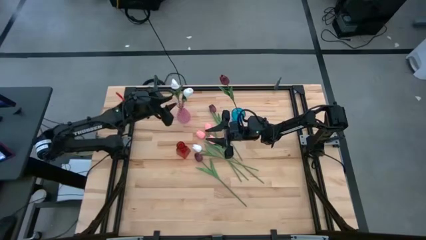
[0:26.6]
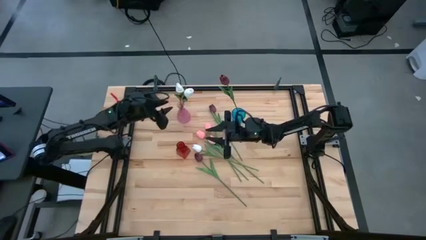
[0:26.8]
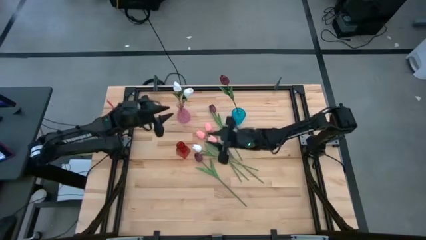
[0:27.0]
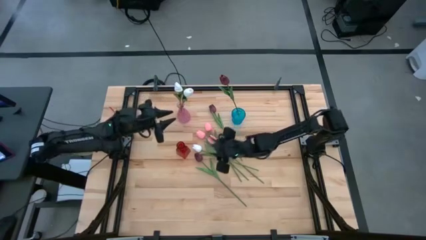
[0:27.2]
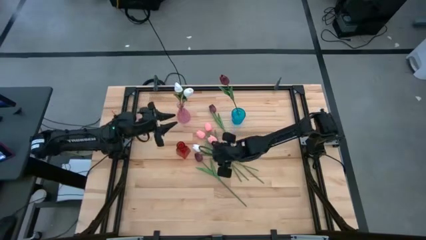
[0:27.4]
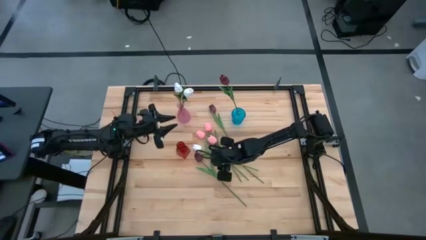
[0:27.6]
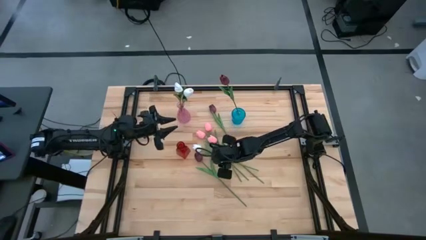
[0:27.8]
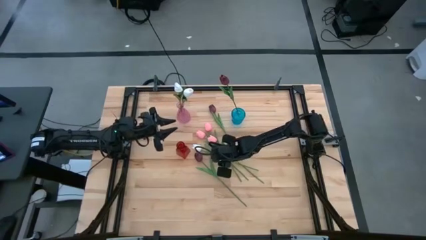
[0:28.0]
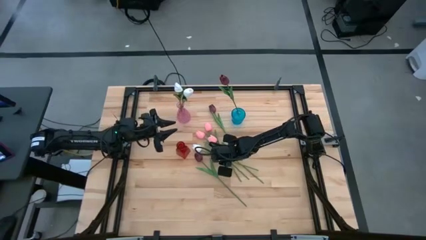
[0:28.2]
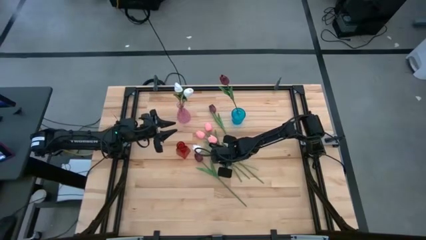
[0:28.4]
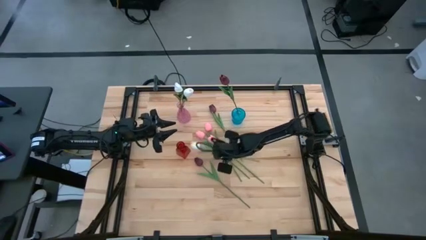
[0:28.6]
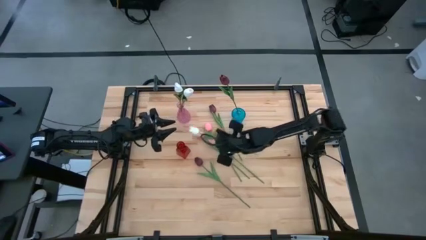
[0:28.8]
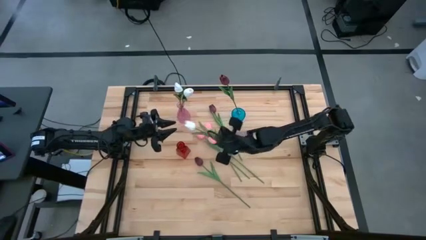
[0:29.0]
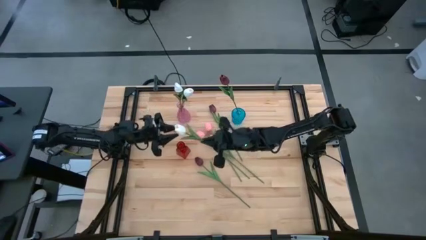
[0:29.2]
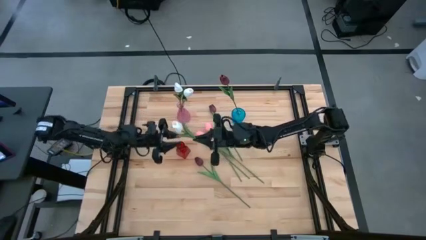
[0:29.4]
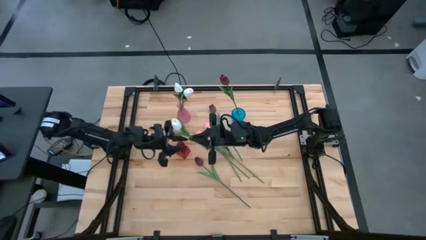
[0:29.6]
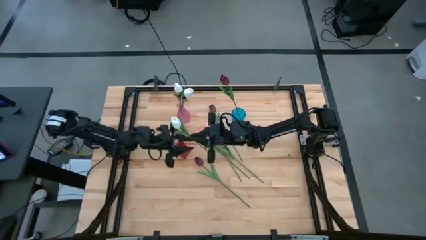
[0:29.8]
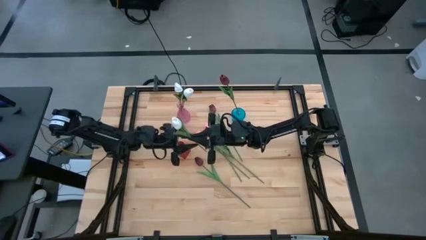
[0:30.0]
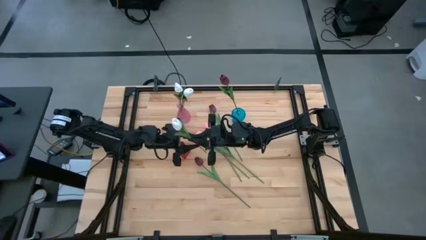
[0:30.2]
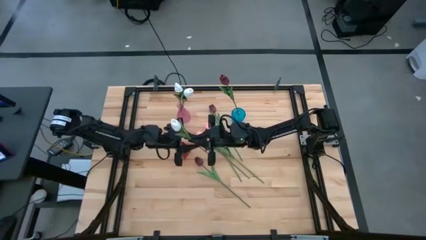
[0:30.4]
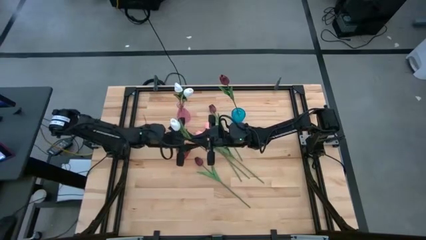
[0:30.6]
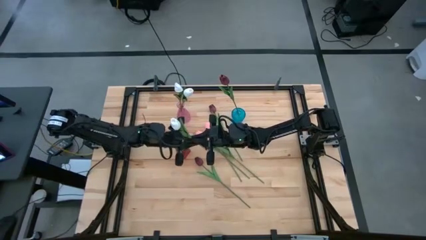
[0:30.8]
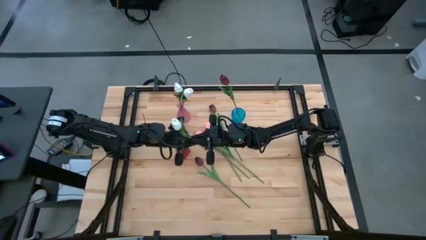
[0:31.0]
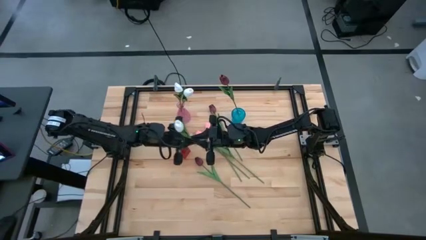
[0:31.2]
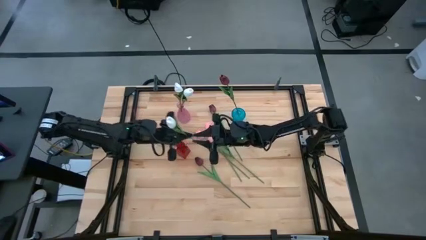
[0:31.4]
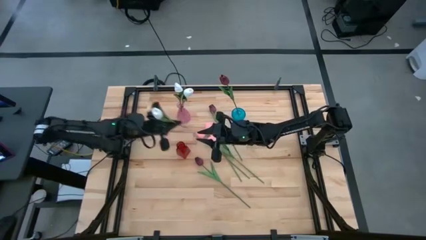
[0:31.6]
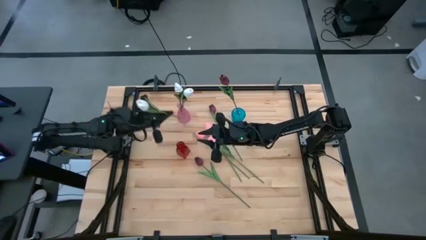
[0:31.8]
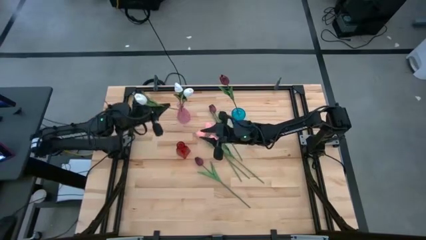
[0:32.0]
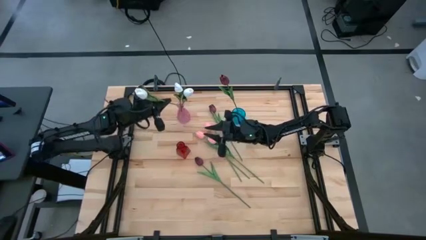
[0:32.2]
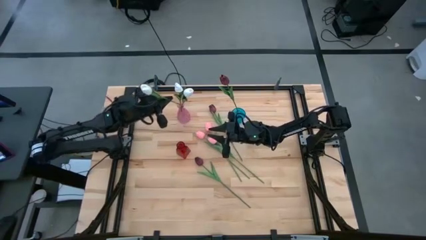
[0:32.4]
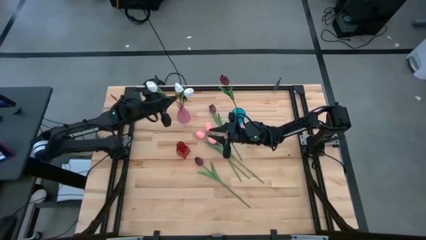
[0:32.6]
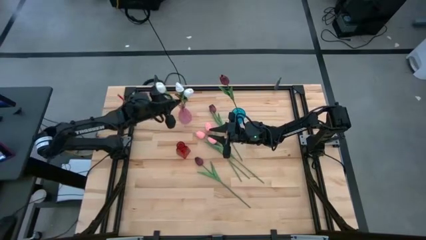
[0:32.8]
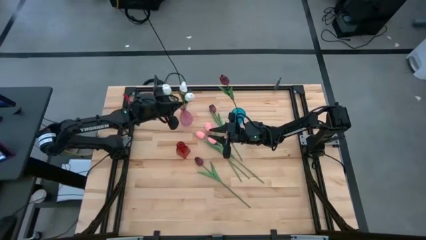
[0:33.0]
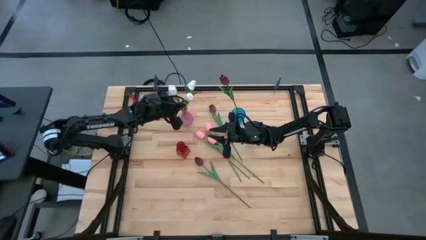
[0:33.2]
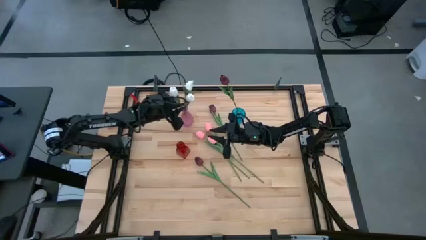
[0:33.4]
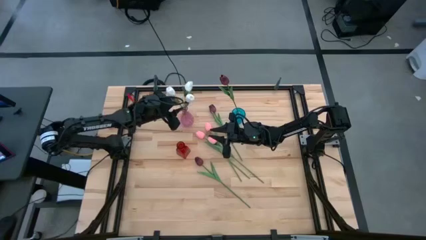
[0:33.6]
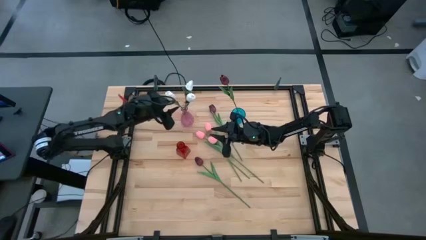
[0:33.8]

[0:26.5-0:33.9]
Task: Sort flowers into vase by color
Put the white flower into the pink vase

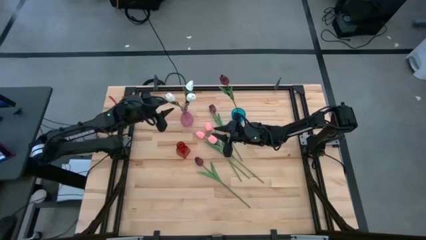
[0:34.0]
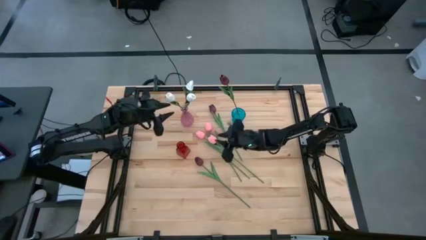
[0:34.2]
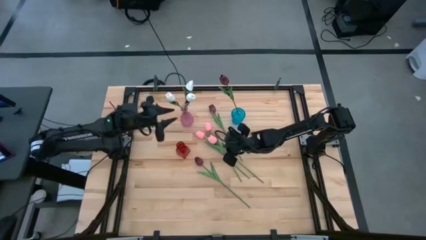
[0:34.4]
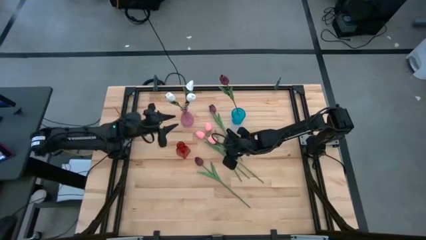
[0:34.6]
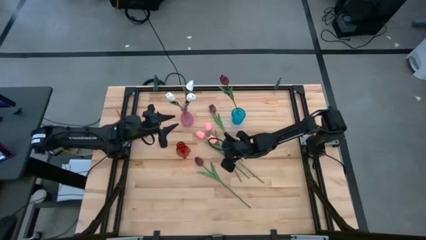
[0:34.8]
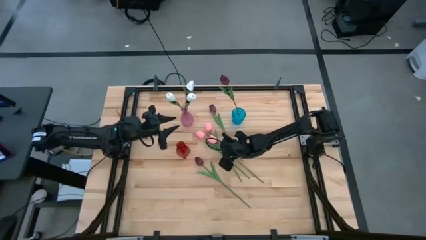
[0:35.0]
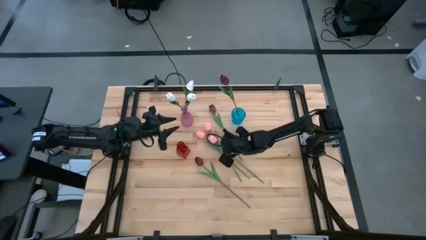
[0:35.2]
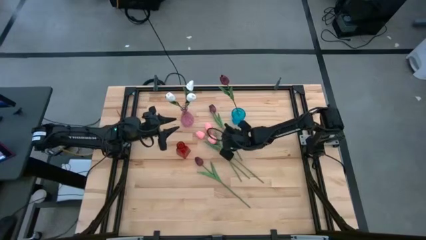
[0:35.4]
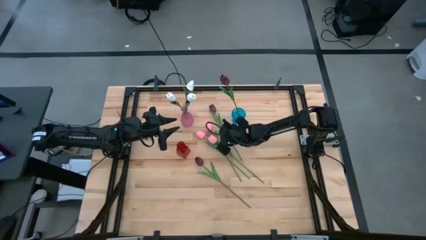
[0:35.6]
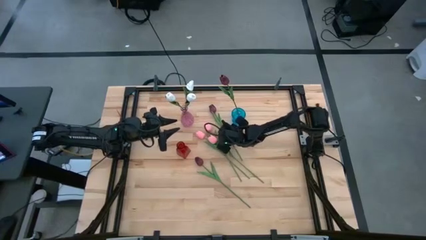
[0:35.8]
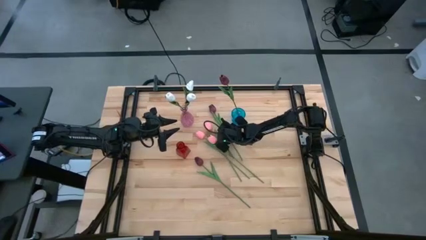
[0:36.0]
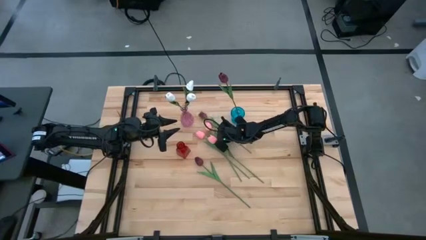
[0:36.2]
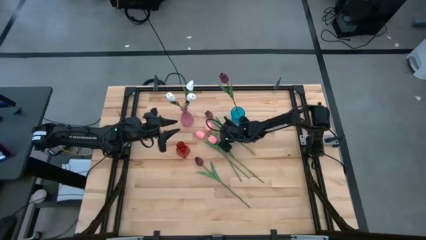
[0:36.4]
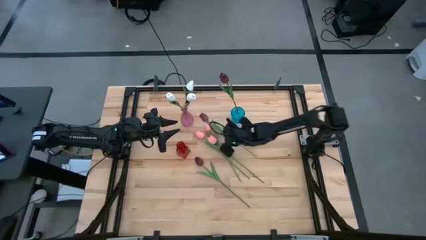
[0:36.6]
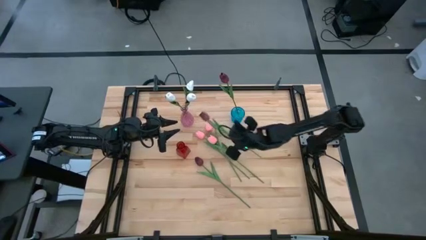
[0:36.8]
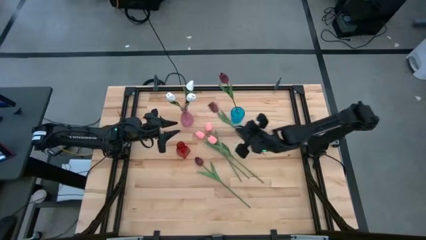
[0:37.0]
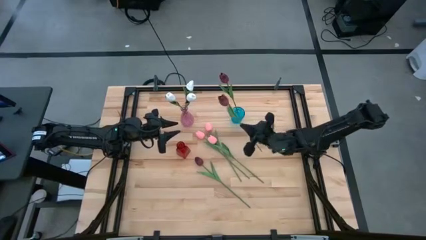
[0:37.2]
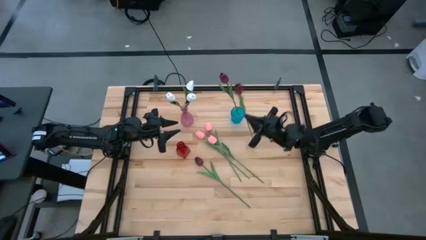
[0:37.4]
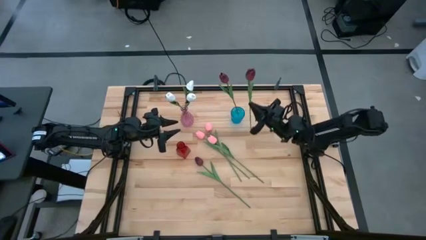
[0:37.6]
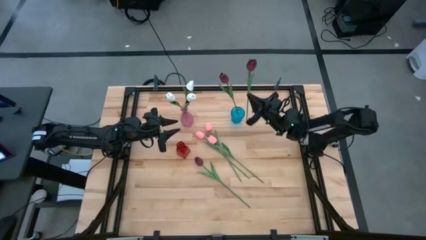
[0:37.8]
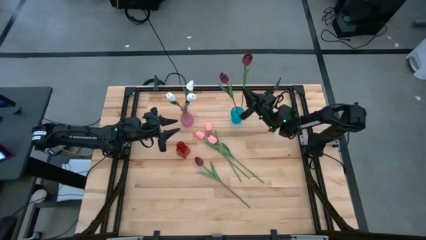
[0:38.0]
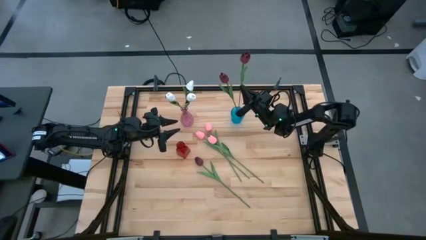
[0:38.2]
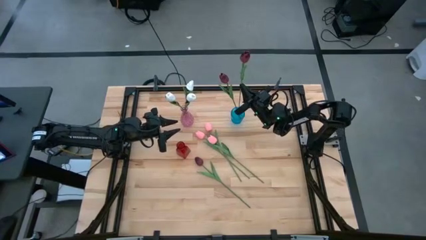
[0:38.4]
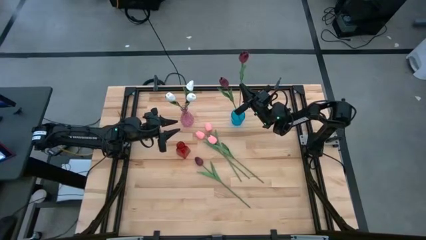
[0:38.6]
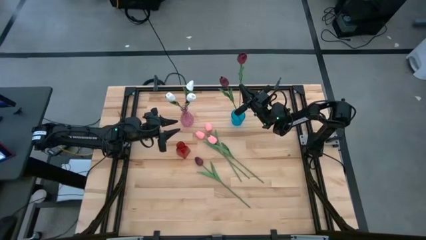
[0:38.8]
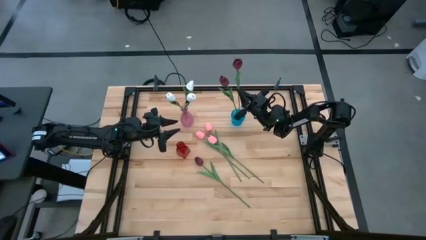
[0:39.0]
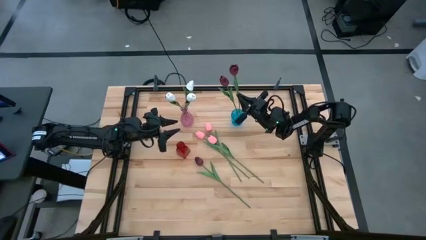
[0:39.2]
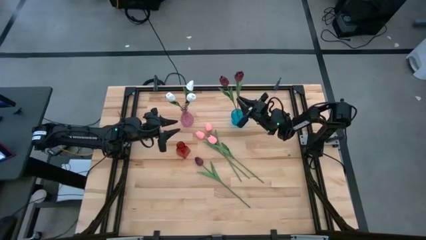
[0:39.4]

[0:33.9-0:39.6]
Put the top red flower into the blue vase

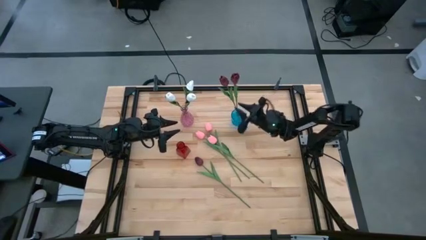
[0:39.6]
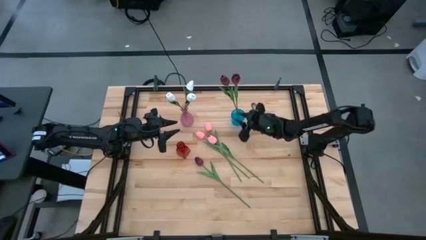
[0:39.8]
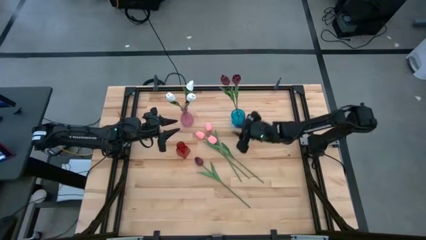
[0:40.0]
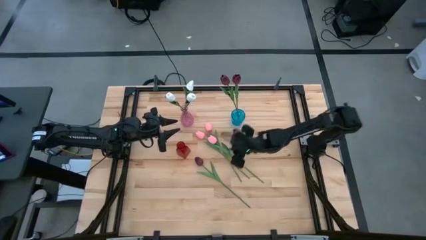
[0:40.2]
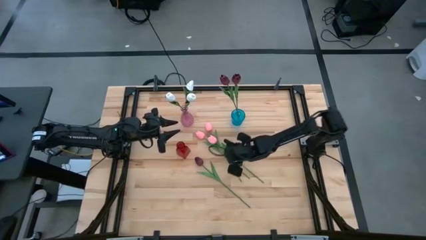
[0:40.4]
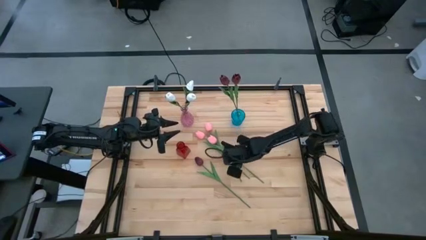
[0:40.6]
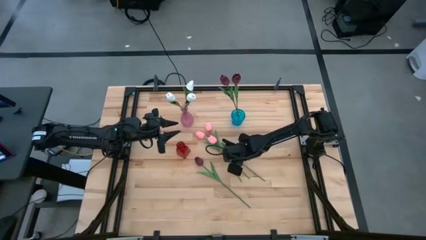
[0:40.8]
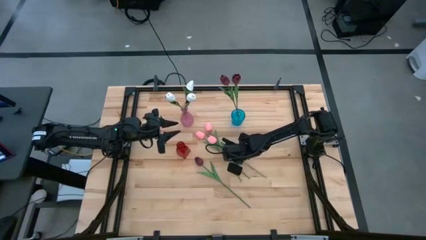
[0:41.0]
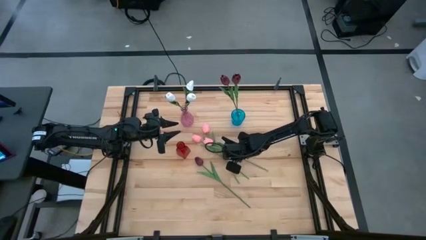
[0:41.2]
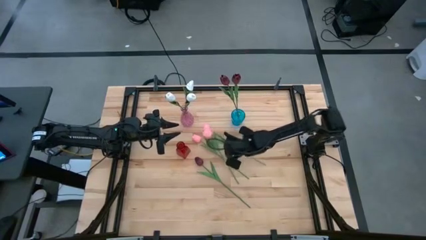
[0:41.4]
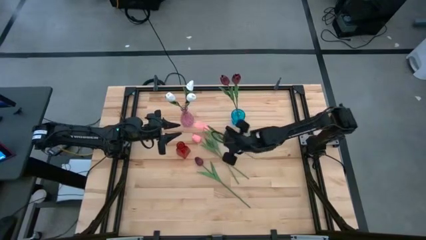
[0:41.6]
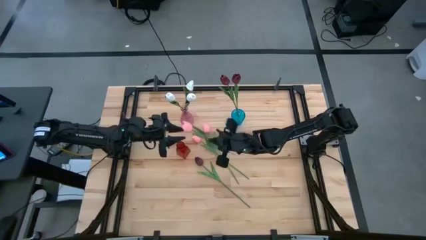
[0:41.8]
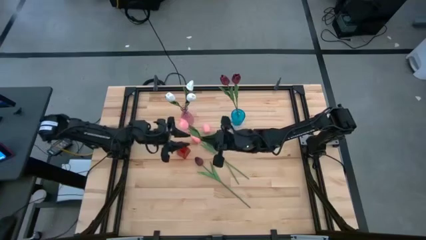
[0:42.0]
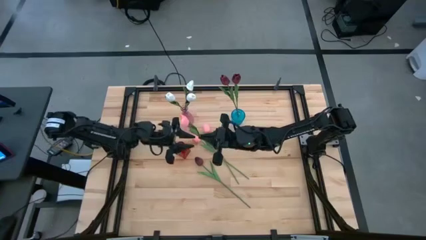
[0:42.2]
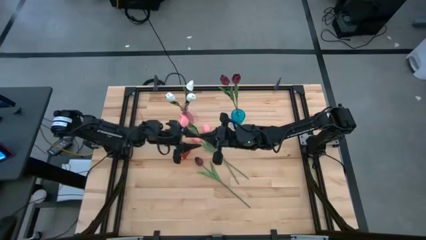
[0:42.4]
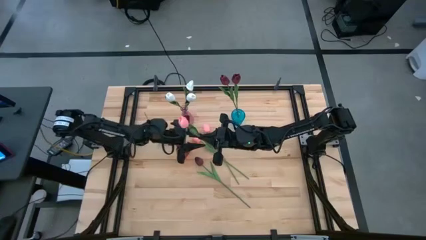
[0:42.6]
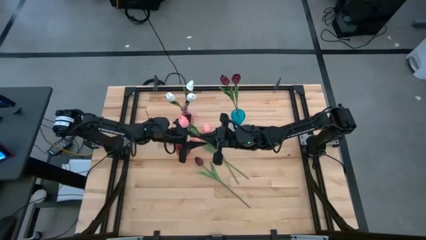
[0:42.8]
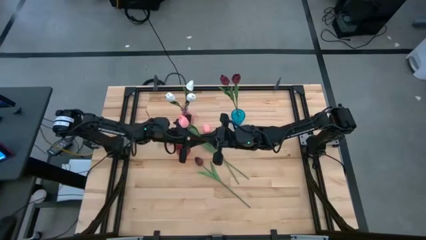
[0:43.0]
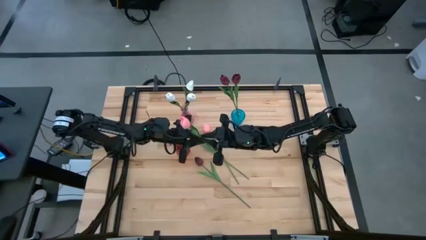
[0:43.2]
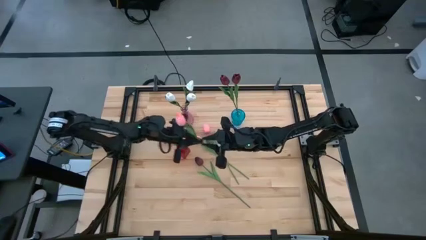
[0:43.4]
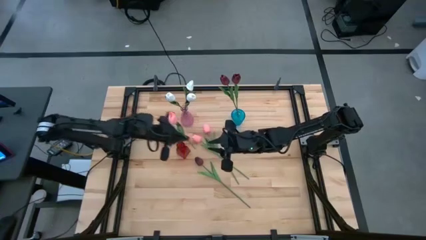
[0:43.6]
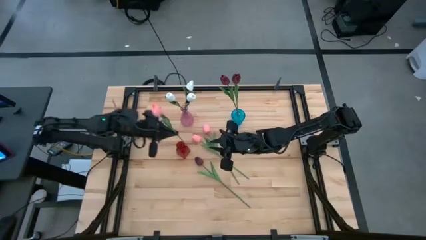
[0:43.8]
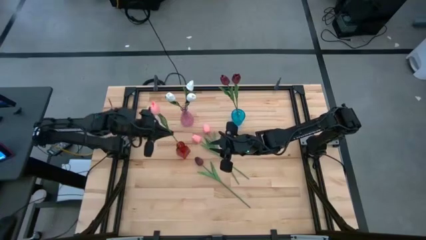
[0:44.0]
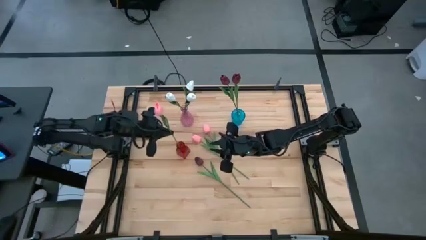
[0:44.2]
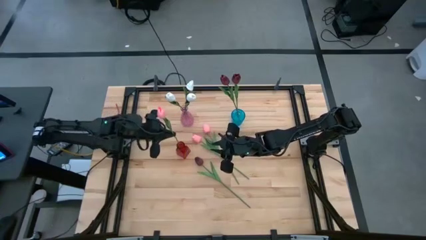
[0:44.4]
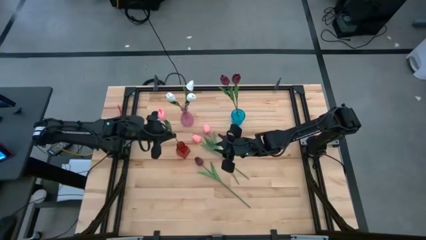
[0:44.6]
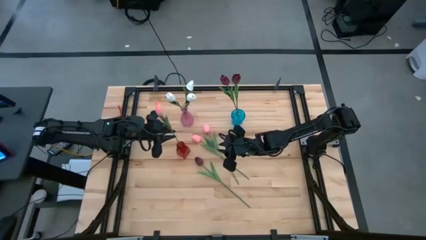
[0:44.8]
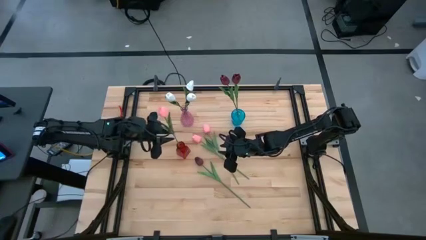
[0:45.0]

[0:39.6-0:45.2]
Put the right pink flower into the red vase
